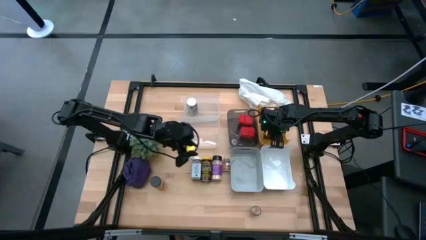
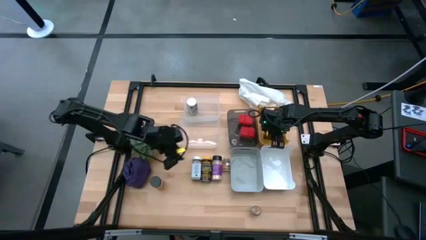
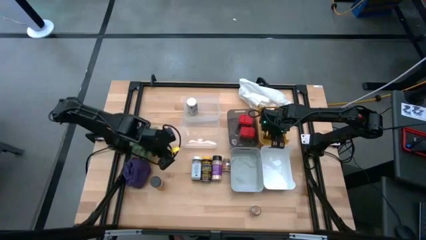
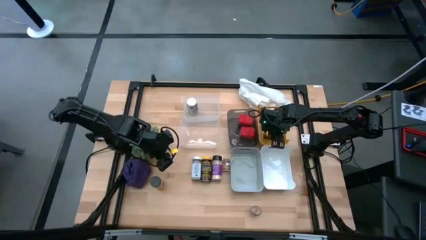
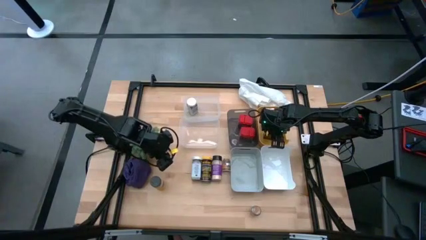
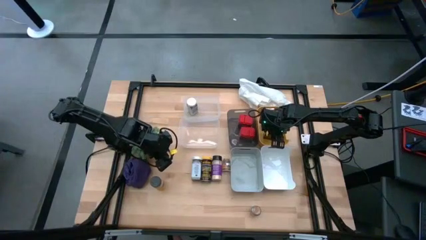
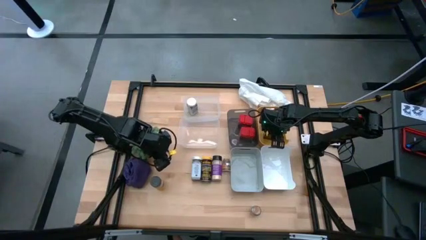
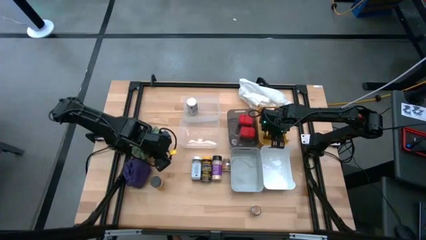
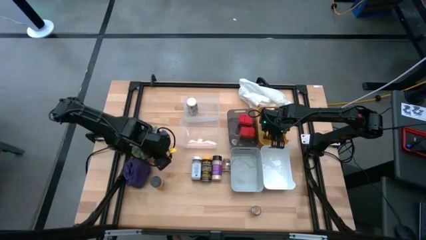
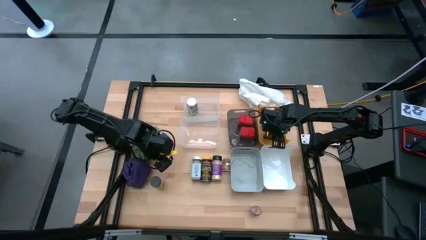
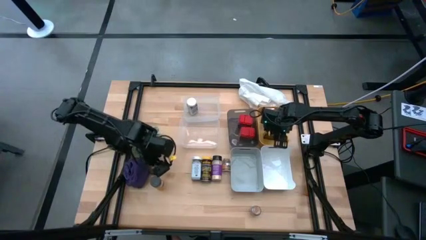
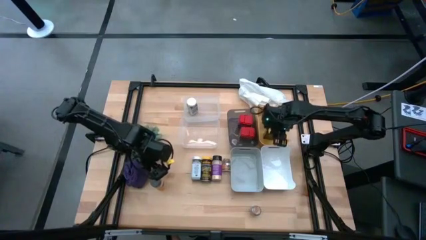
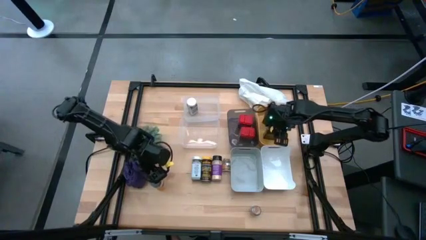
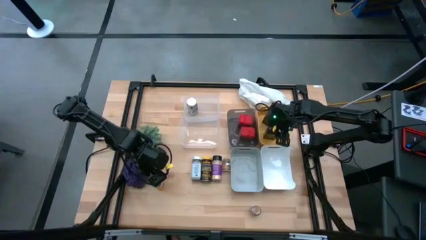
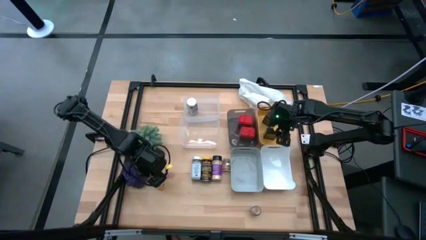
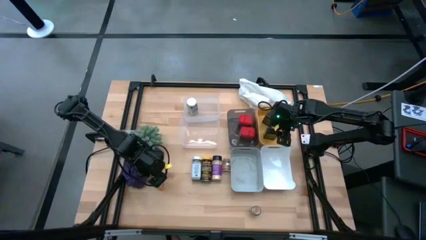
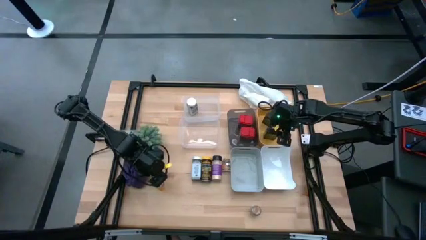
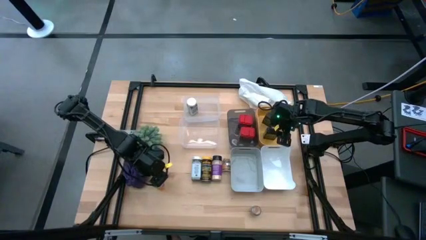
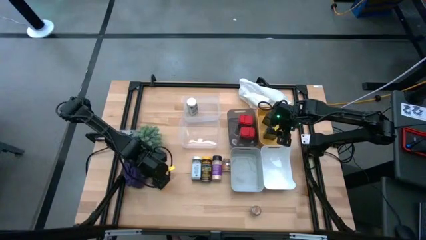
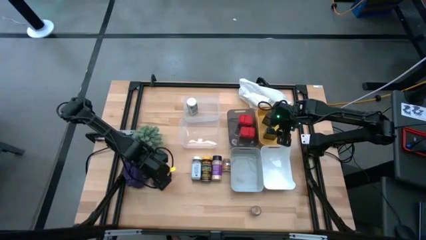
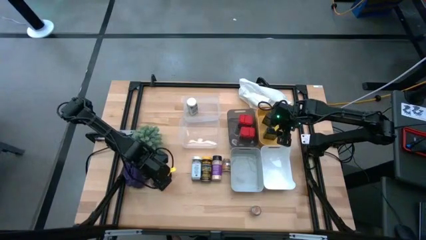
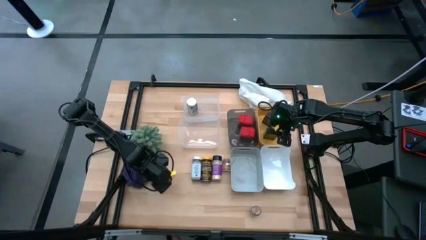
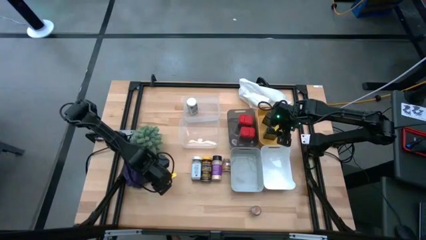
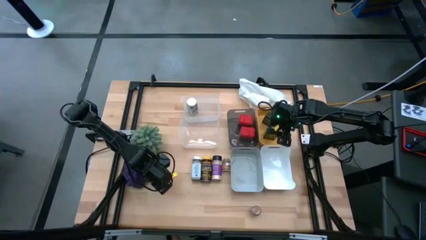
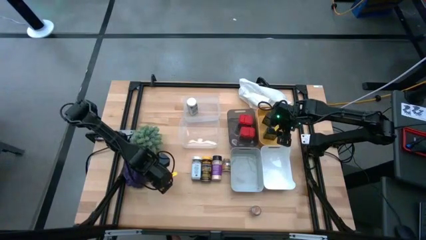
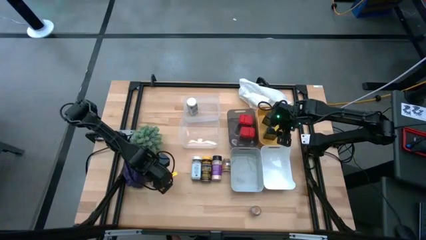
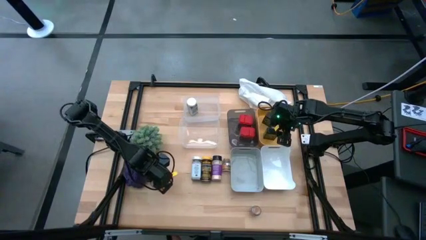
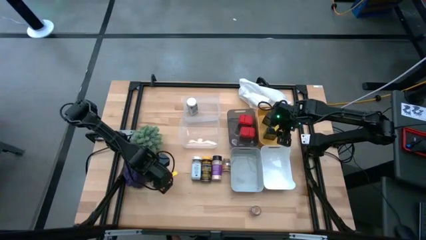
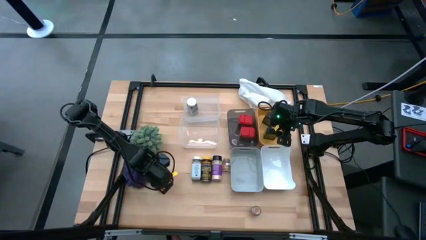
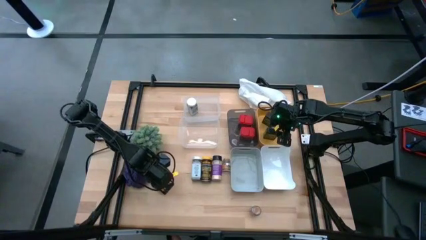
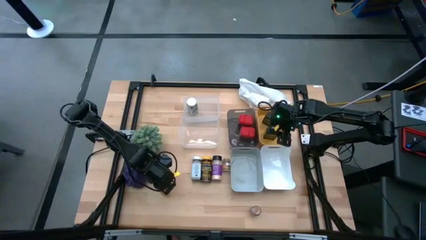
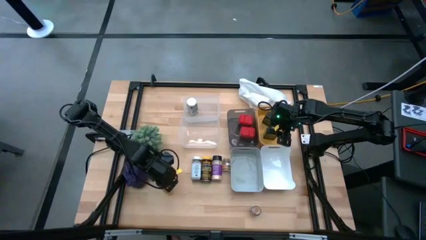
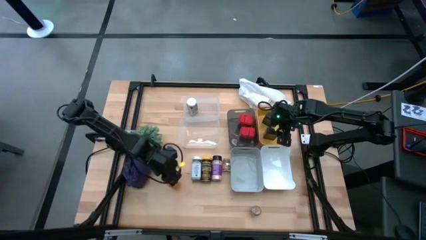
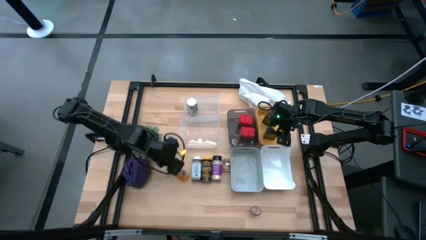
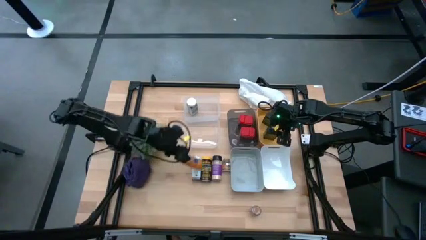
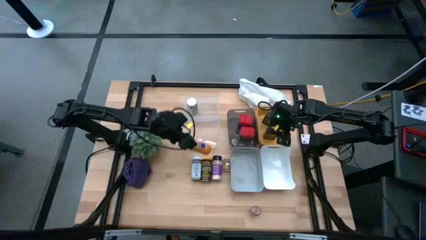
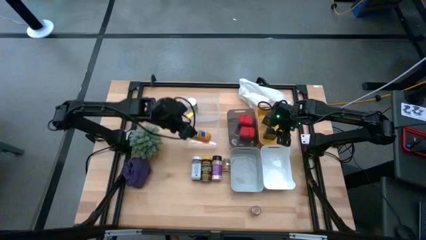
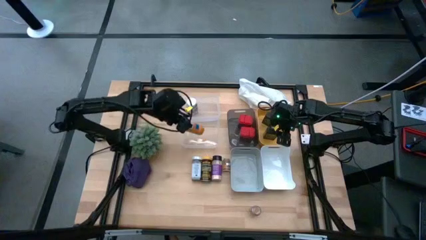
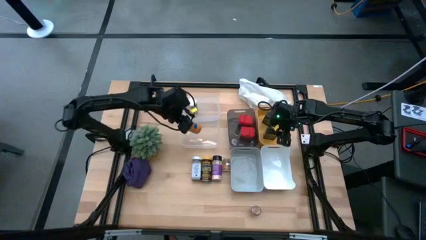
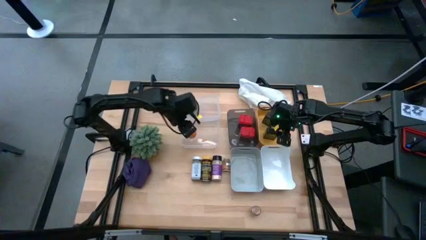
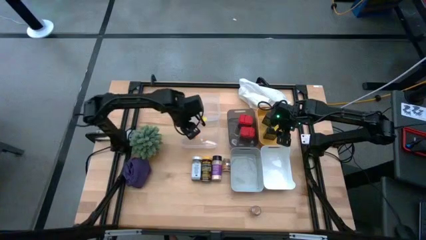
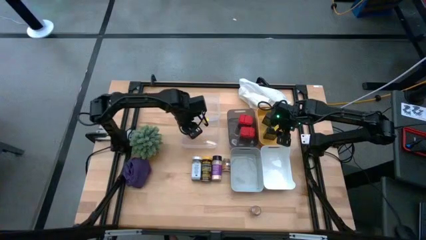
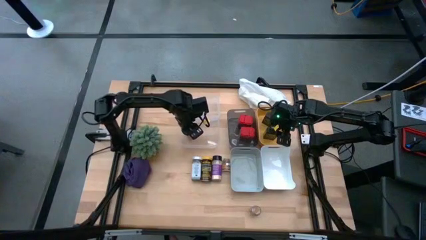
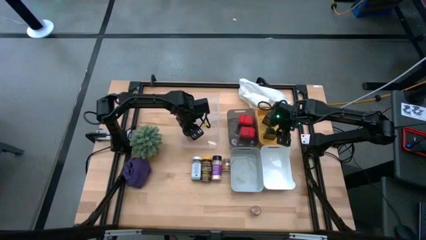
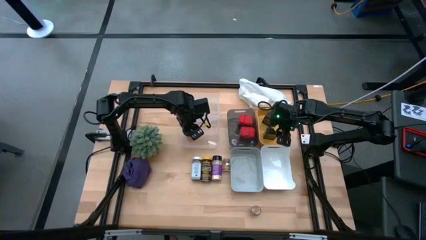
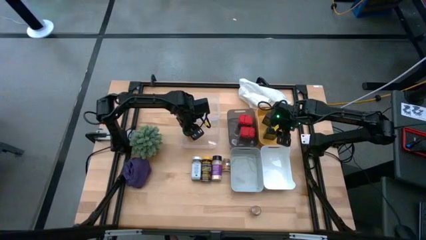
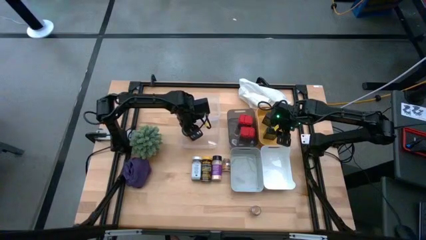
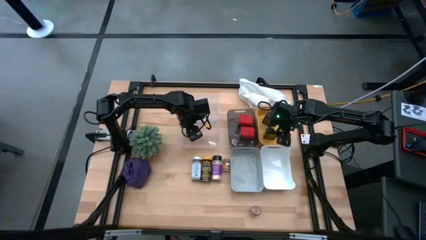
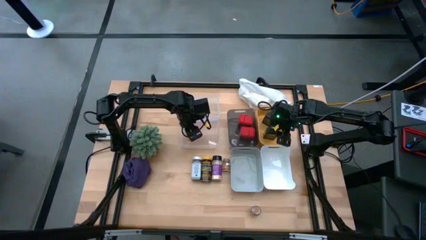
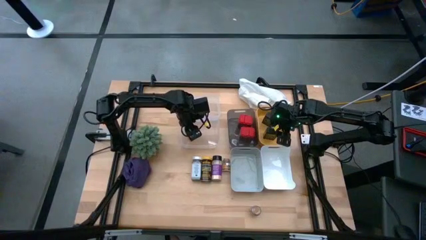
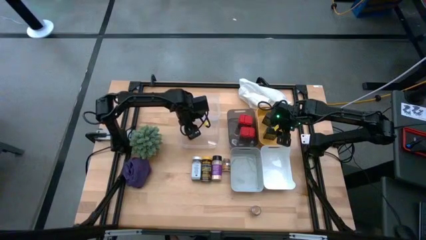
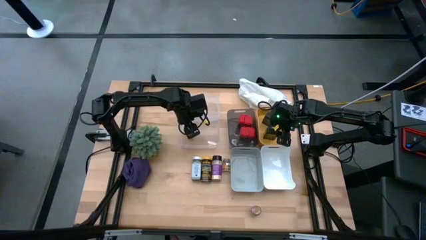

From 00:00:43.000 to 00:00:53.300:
Task: Sort spices by type
Put the orange seasoning bottle into the bottom transparent bin

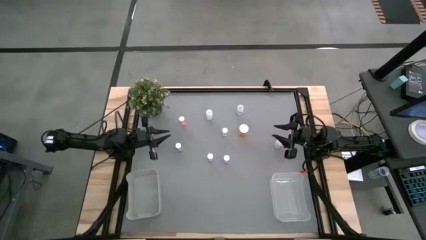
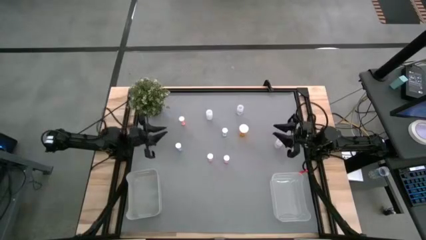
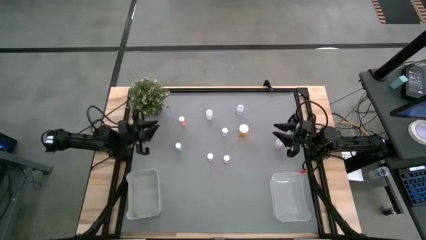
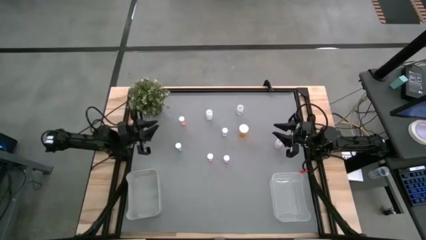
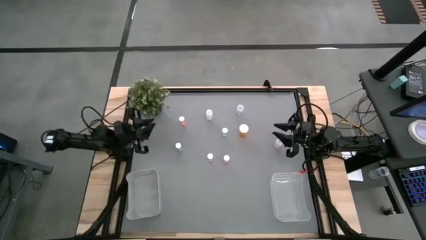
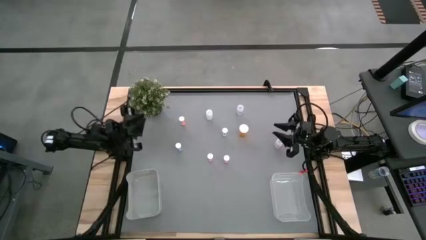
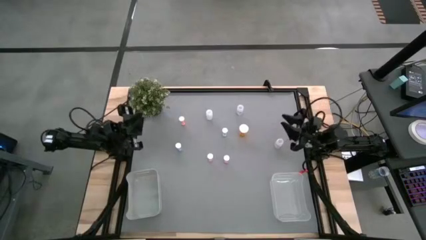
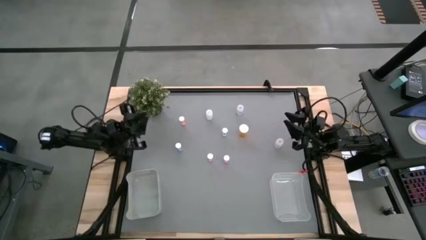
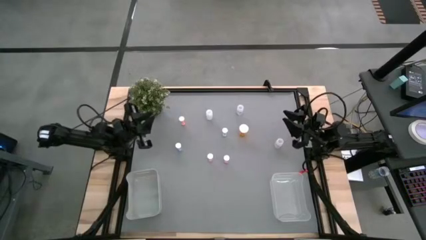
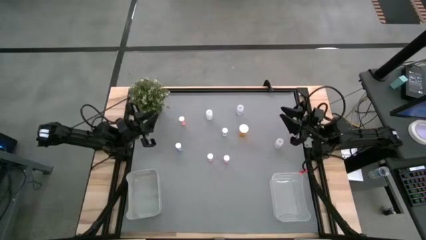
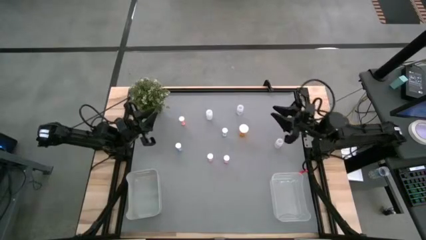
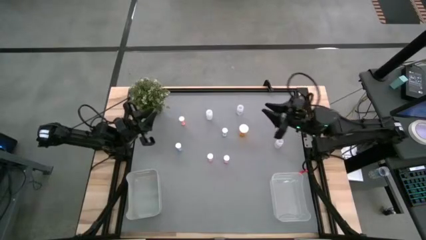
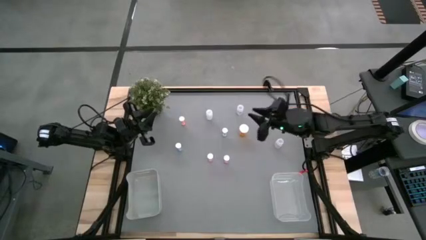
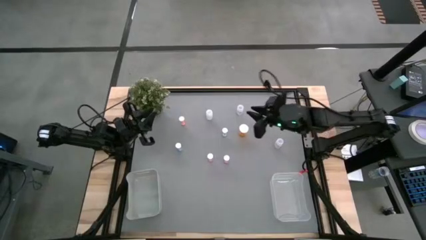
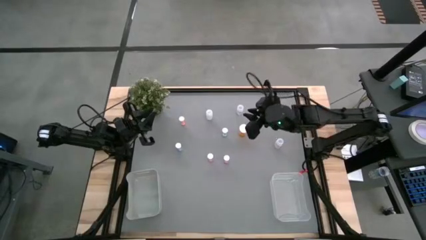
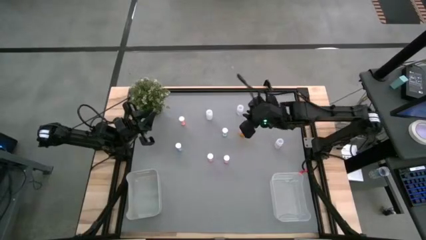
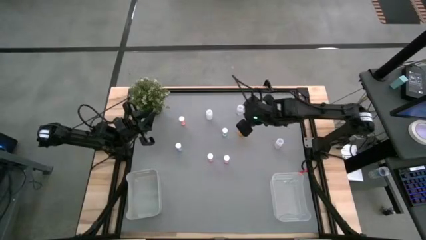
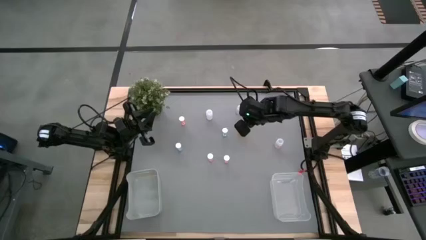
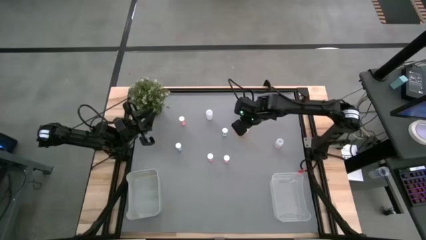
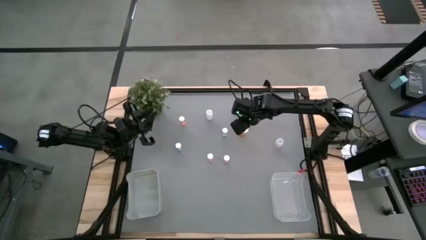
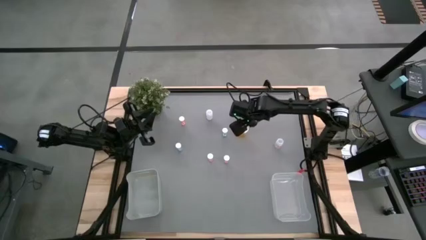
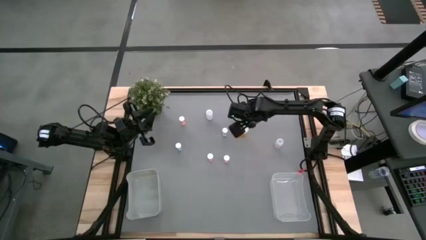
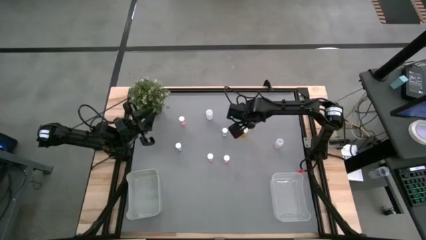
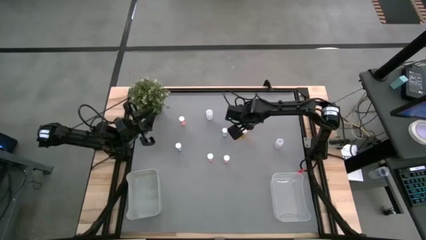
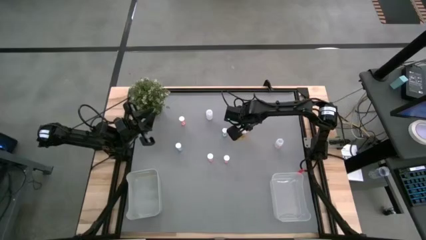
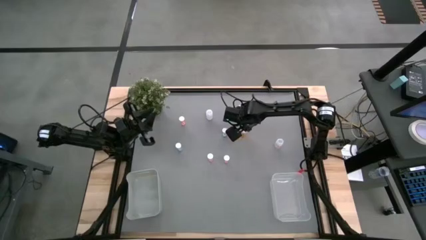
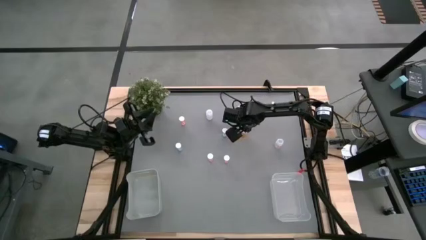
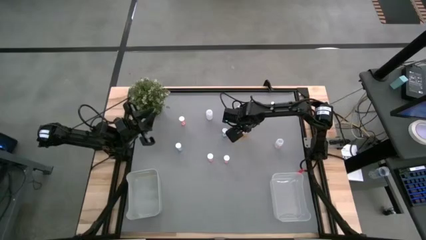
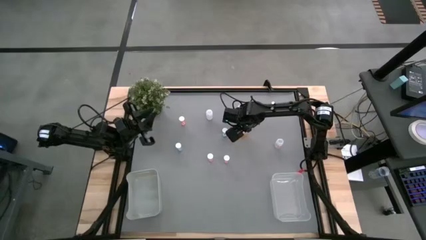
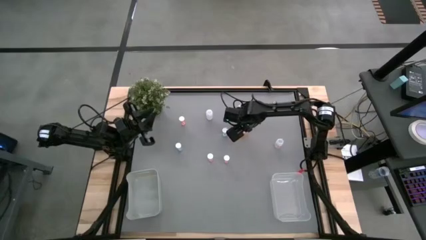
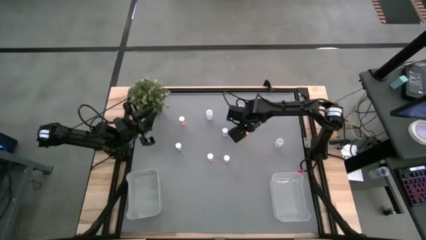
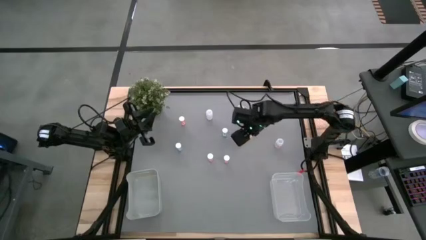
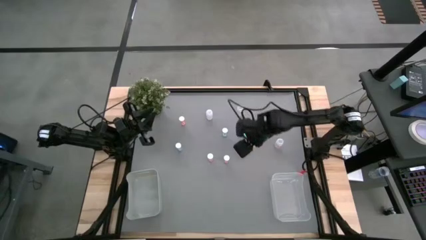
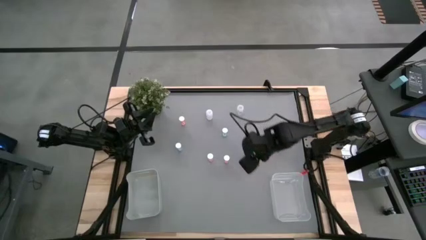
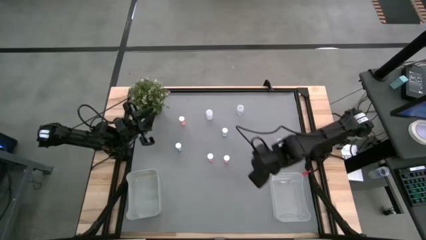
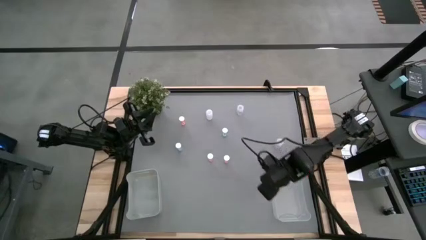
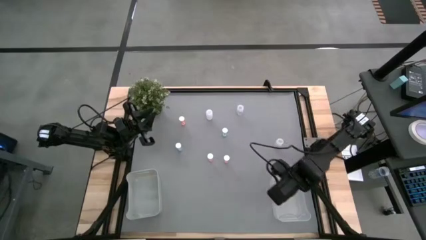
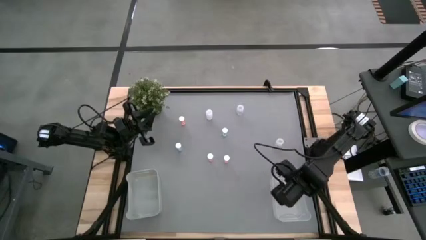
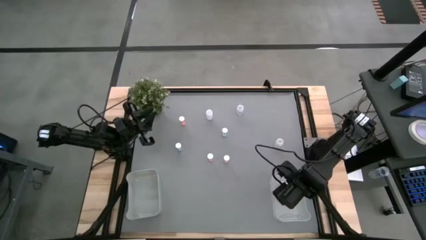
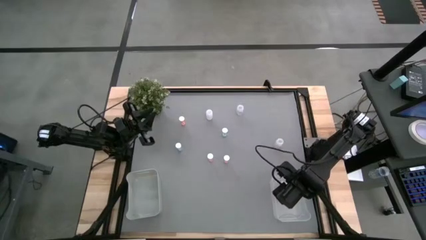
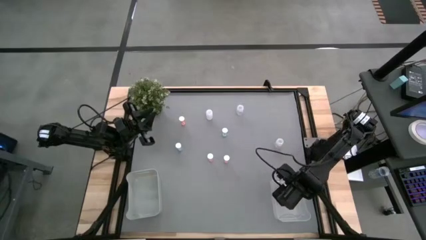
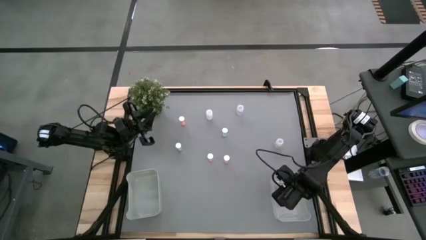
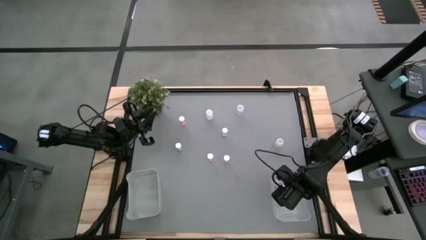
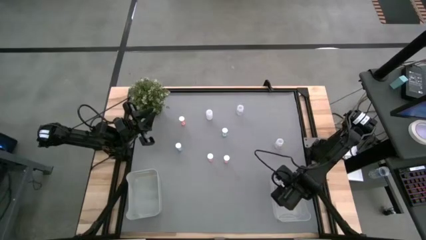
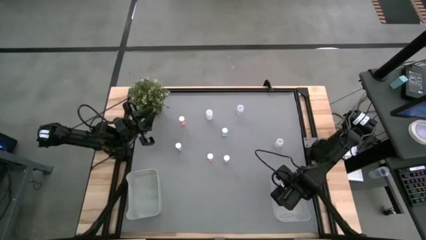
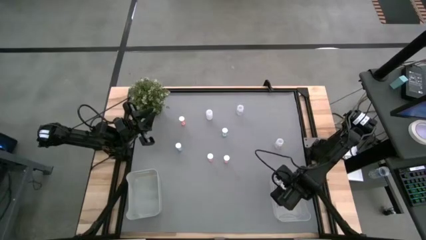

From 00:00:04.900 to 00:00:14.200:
Task: Pick and place medicine bottles into bin by pill shape (circle, oval)
Put the orange capsule bottle into the transparent bin
